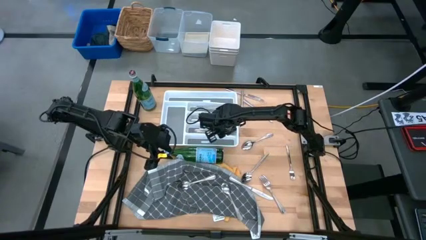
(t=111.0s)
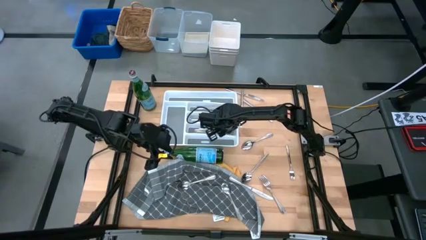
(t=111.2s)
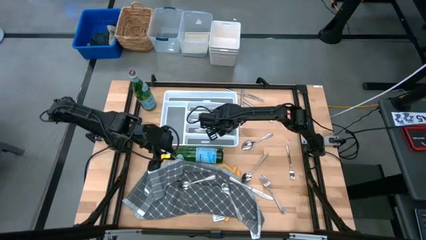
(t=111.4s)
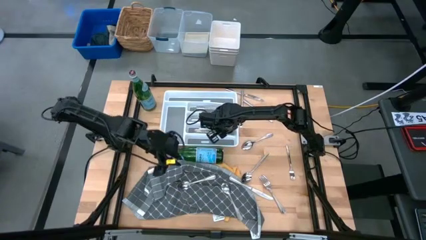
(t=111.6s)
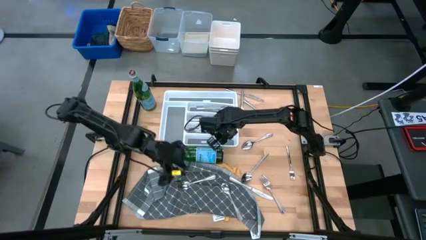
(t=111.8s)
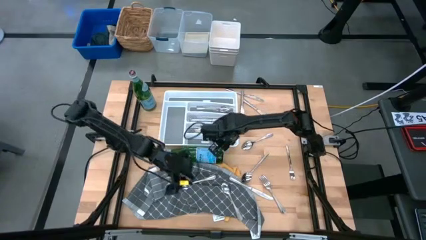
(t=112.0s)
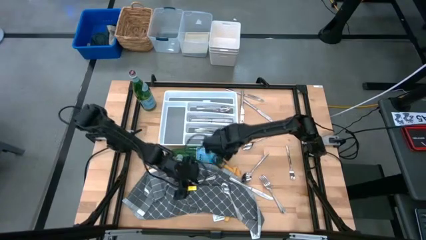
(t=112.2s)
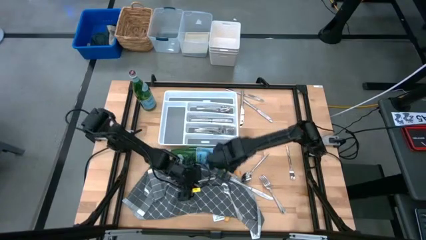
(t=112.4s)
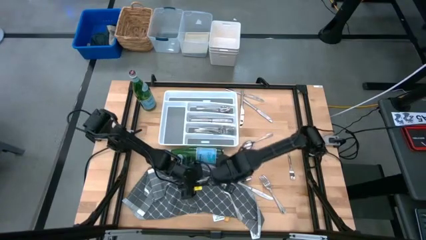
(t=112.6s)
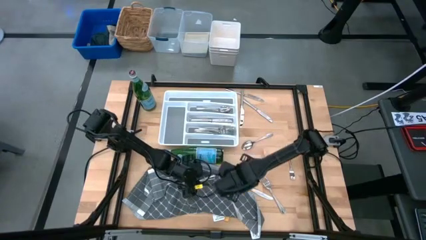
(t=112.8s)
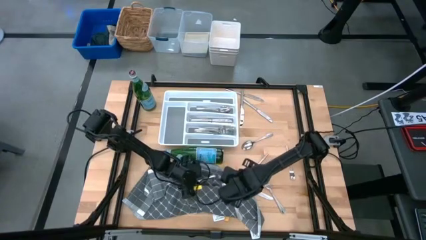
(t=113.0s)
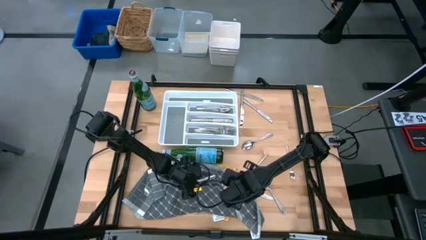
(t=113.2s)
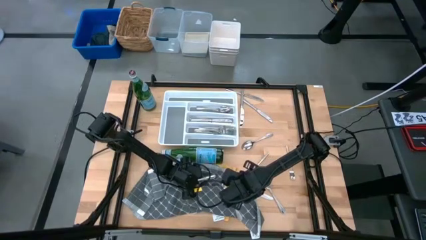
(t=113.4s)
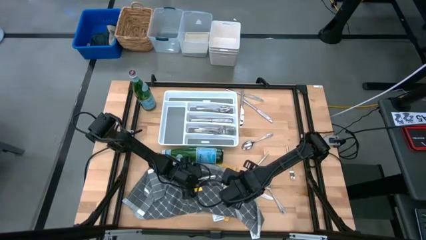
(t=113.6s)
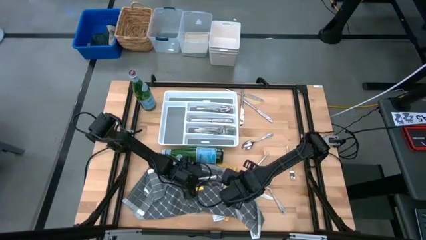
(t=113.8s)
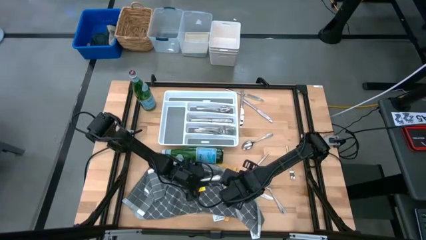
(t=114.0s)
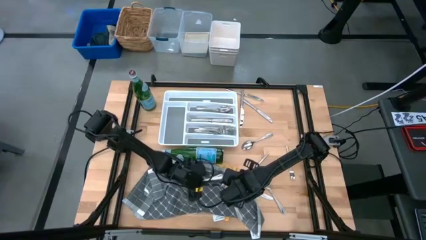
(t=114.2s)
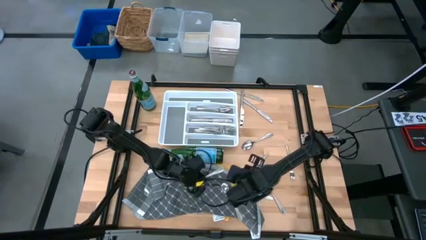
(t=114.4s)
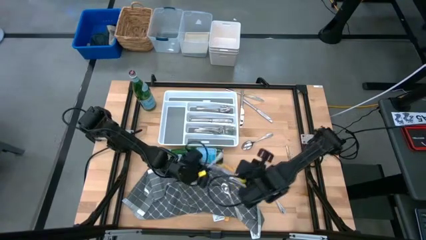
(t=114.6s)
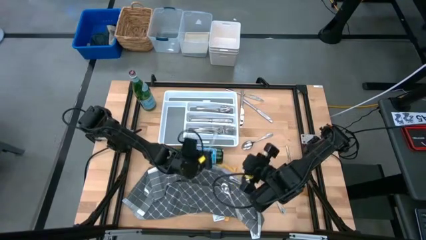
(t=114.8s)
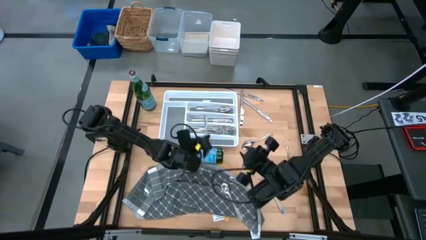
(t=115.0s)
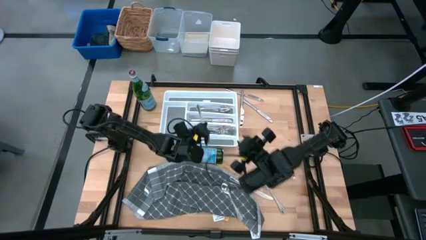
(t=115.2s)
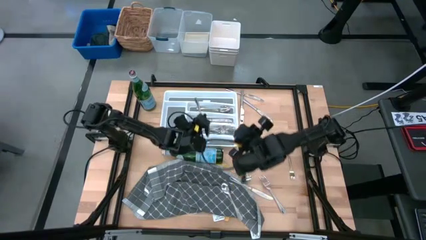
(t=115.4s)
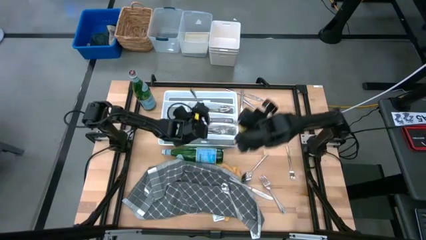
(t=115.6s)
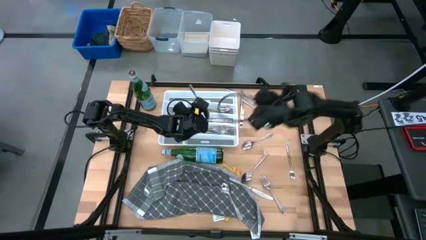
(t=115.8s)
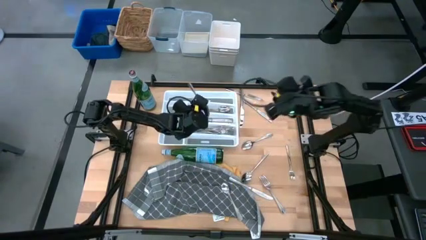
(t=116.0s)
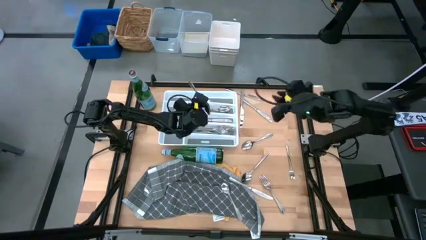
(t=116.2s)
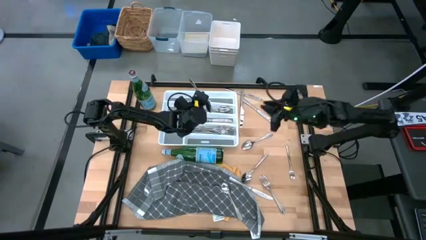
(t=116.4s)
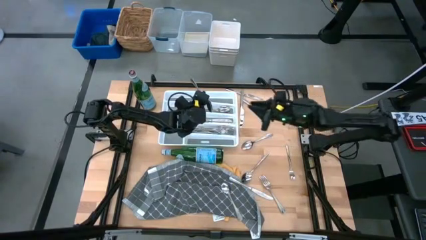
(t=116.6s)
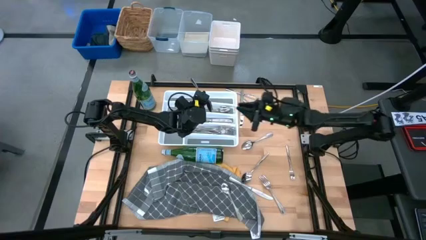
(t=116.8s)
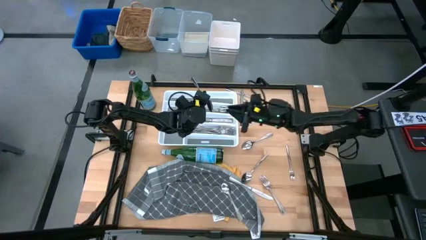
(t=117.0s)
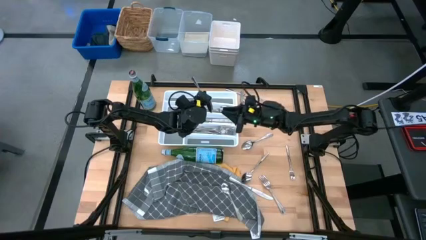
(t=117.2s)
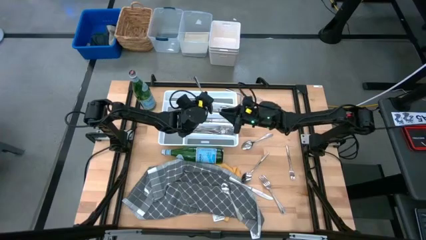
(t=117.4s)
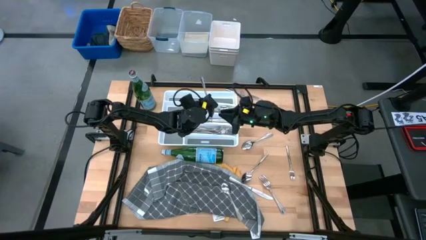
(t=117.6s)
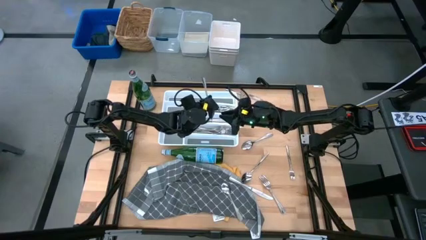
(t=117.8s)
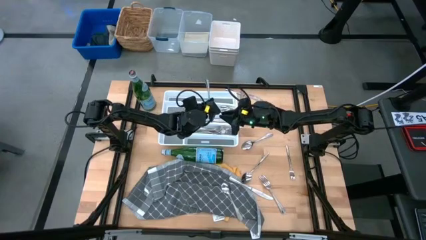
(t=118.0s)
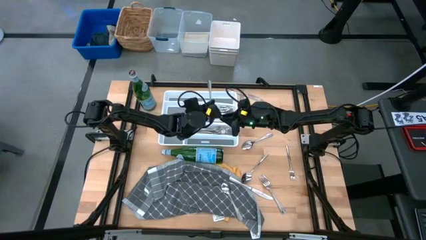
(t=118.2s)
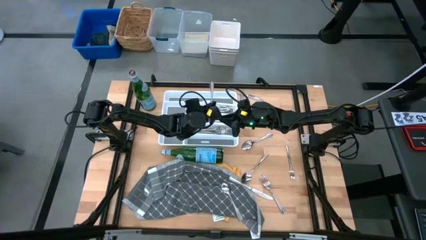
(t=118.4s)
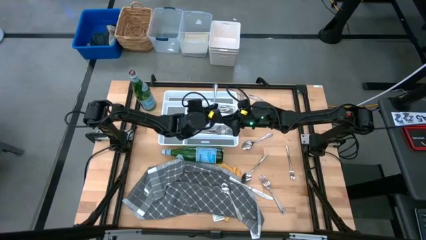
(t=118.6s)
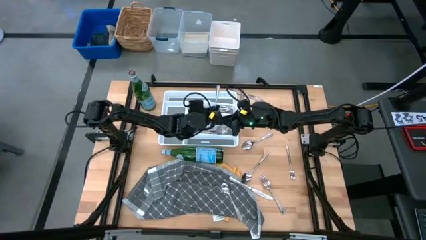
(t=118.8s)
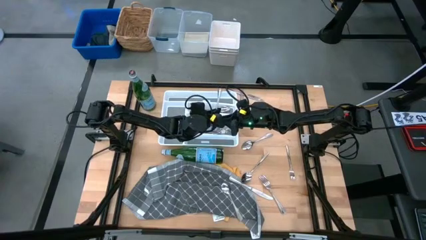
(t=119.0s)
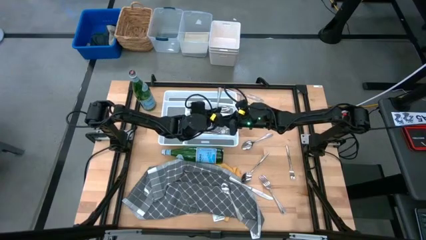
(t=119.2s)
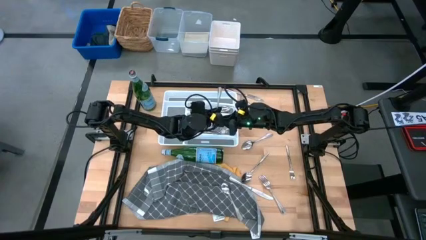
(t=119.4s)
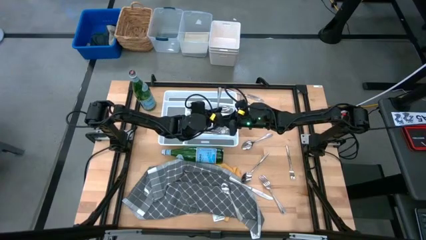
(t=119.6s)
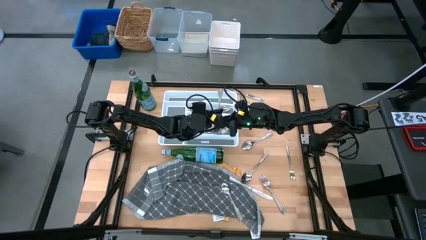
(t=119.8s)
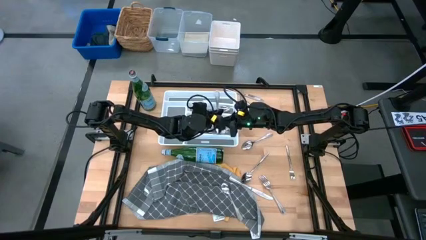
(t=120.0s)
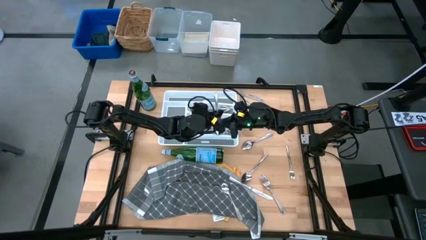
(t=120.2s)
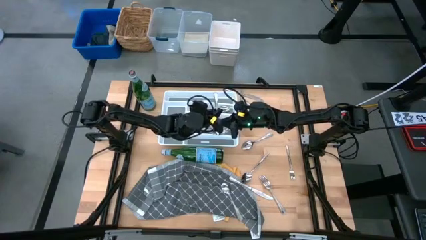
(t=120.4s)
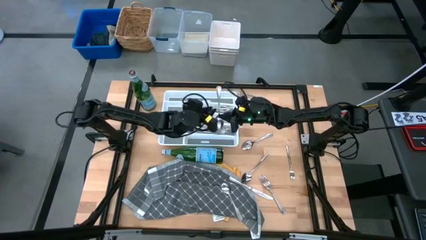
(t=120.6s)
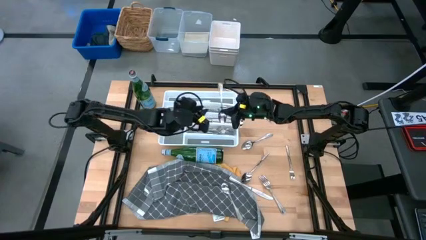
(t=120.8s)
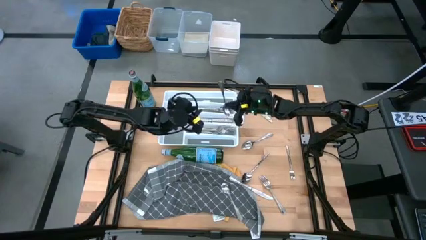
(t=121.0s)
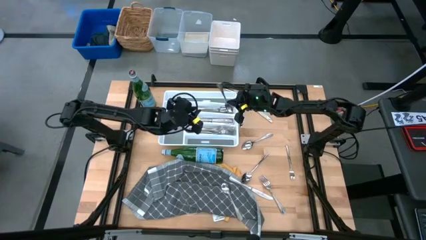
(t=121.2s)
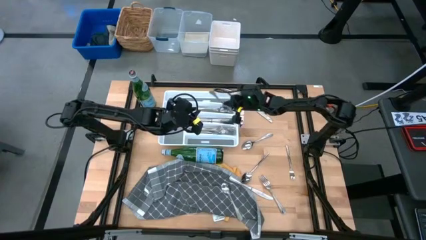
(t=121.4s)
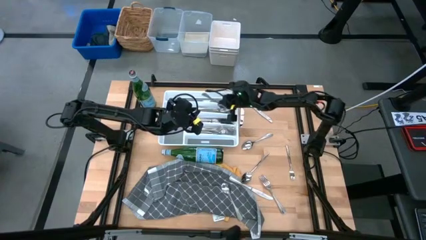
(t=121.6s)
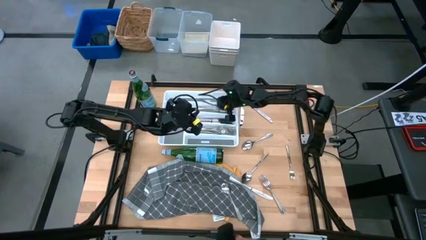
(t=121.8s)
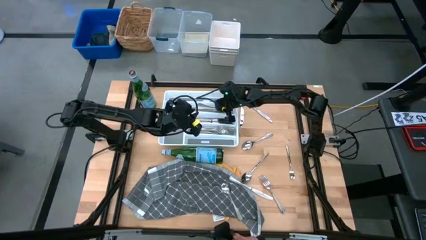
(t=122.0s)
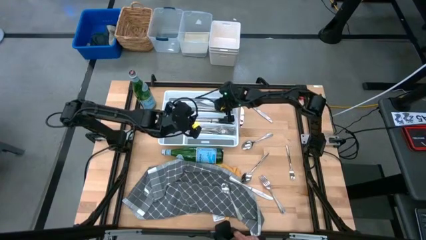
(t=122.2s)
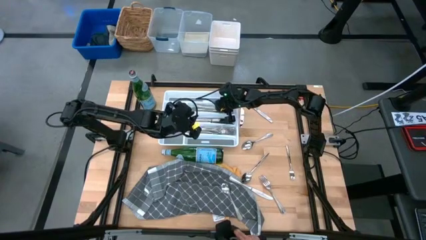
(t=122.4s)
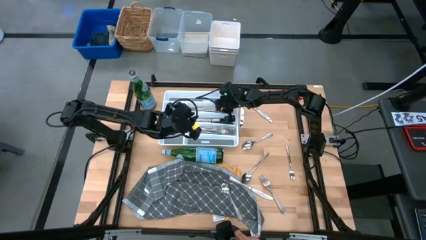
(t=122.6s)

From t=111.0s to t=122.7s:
Task: Sort silverware
Put the silver fork into the silverware tray

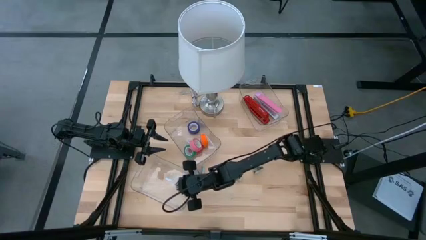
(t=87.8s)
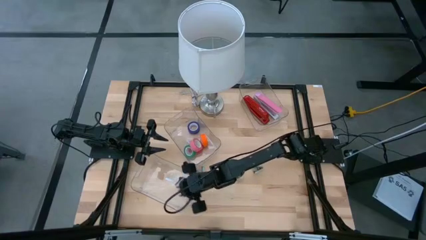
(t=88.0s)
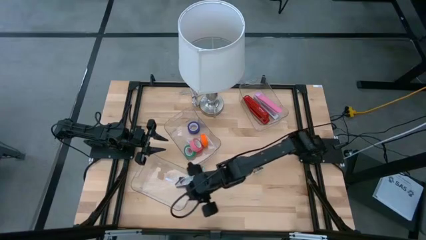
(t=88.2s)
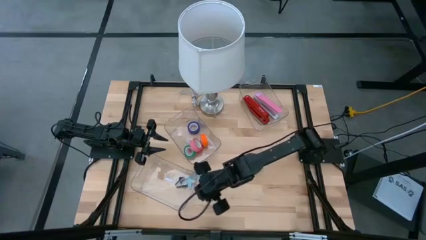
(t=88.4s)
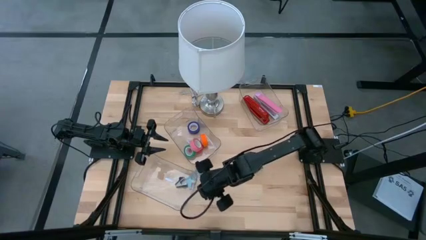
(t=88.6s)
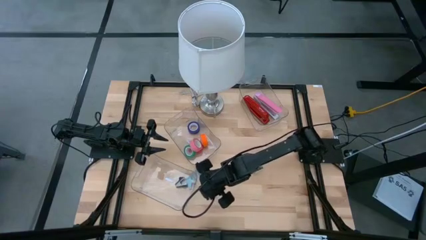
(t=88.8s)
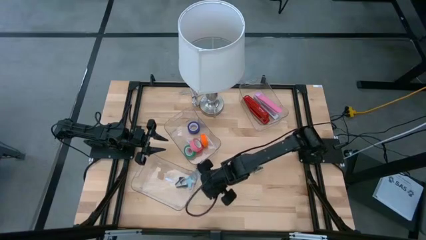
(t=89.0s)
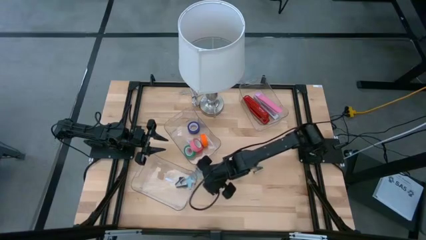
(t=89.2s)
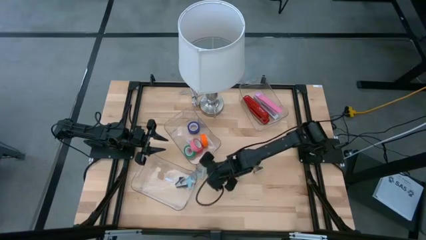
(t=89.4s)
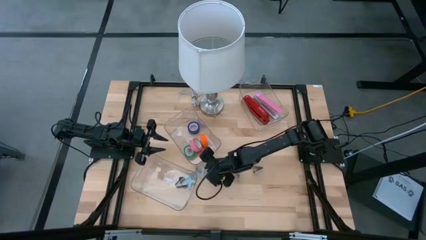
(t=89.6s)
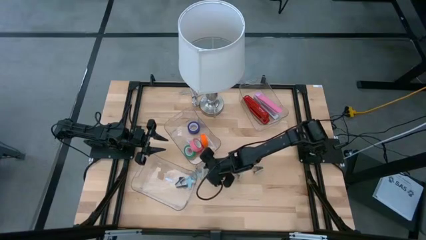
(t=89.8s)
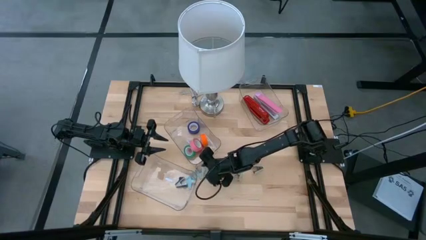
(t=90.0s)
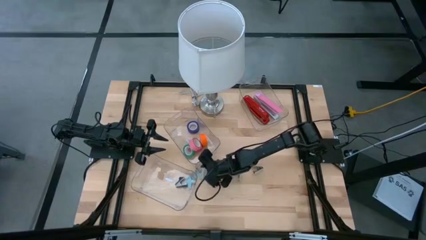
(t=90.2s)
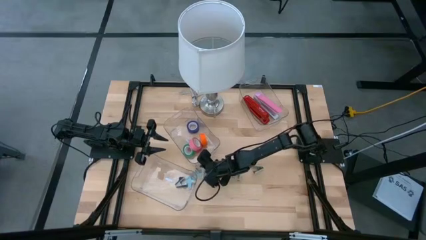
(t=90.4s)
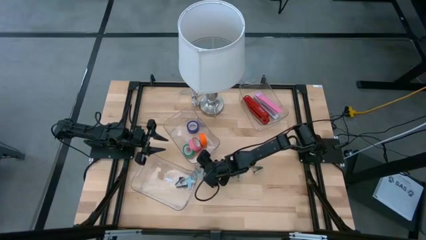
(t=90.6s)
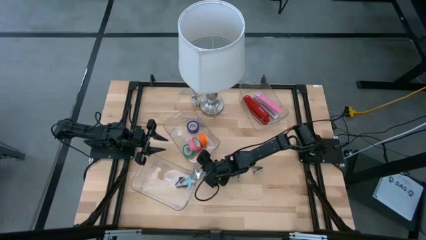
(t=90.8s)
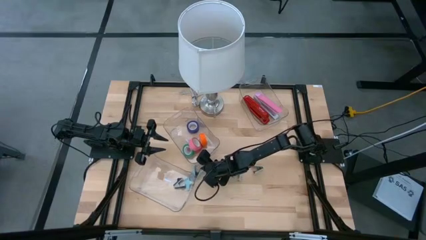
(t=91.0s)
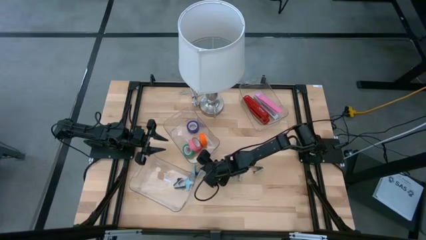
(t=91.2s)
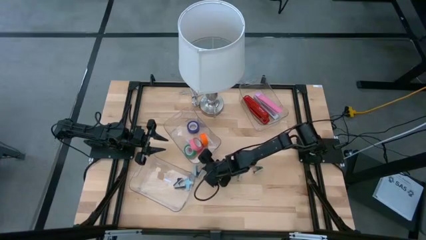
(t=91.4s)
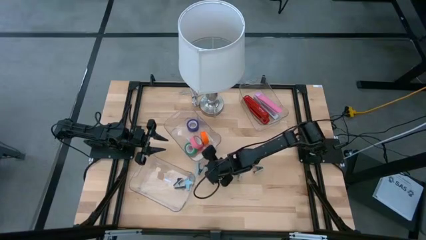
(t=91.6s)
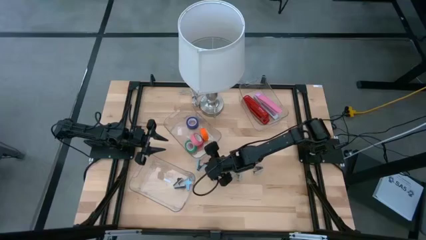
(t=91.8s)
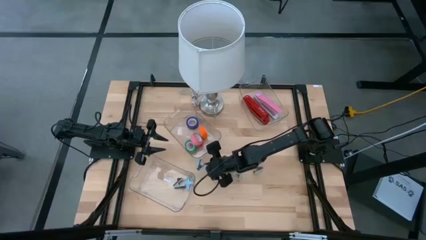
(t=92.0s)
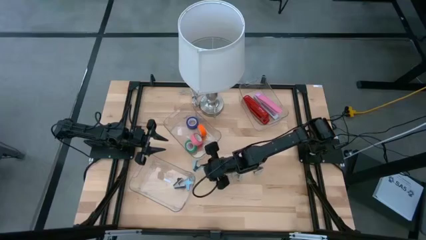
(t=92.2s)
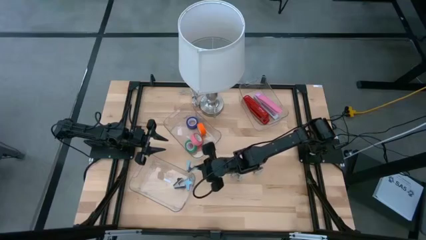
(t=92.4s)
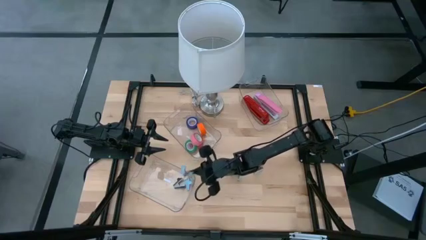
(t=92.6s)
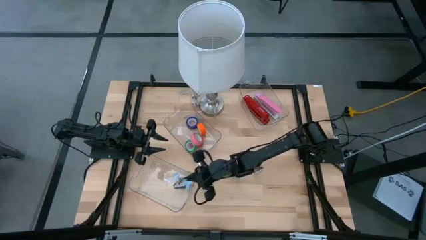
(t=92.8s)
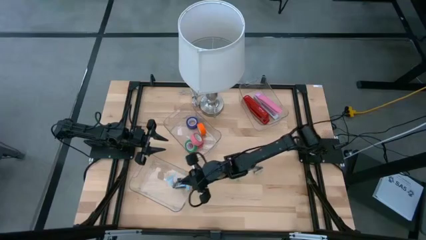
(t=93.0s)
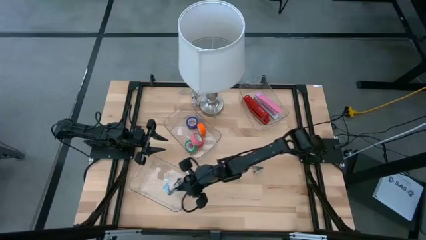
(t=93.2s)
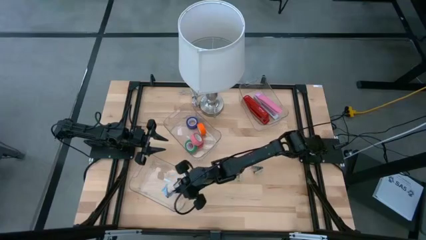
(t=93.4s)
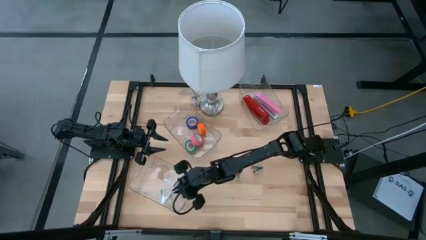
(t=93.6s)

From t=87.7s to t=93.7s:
Task: Pick and place Stapler, Stapler remover, tape
Put the blue staple remover into the bottom transparent bin
